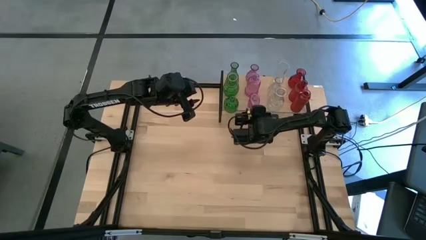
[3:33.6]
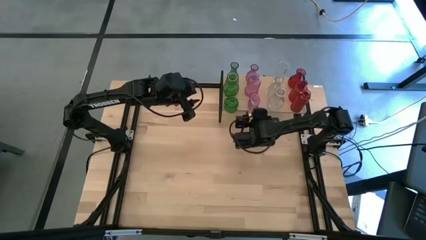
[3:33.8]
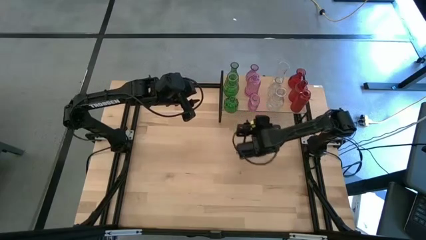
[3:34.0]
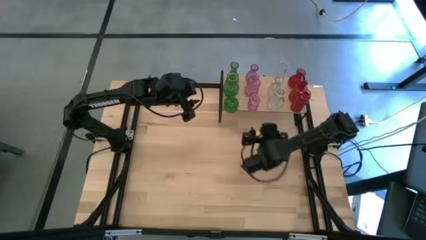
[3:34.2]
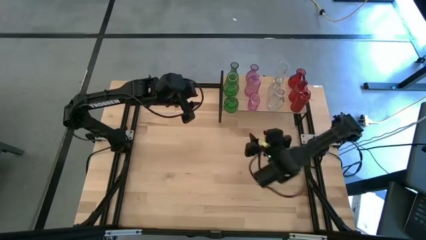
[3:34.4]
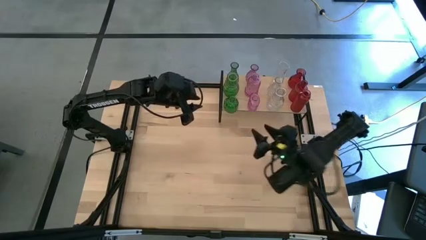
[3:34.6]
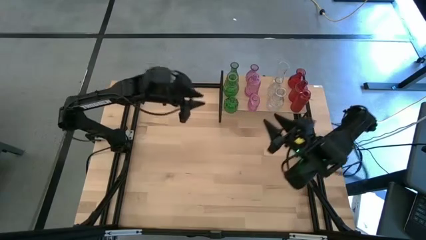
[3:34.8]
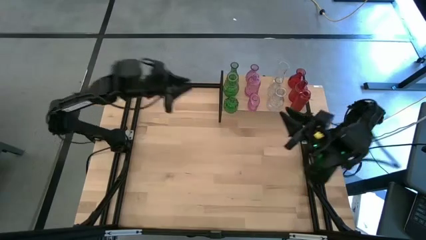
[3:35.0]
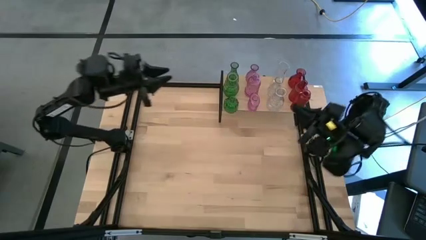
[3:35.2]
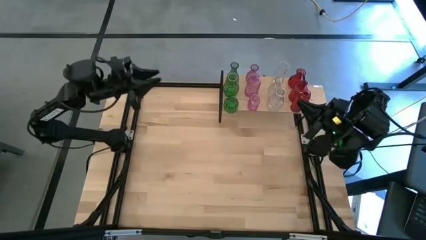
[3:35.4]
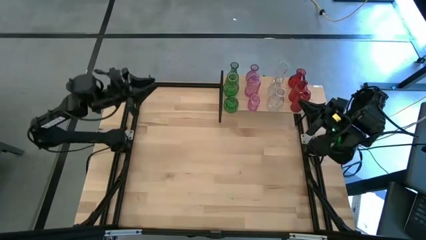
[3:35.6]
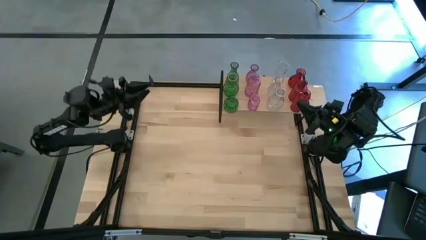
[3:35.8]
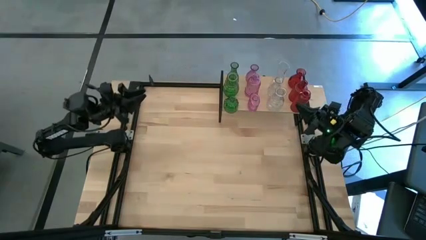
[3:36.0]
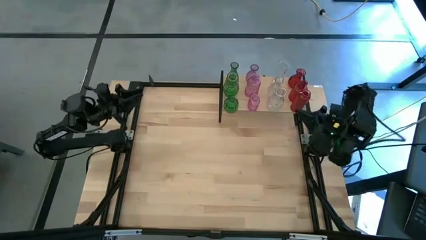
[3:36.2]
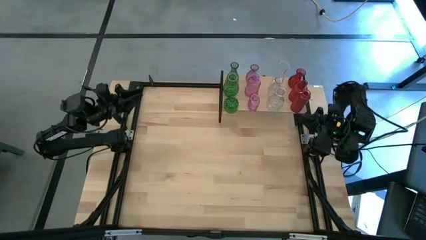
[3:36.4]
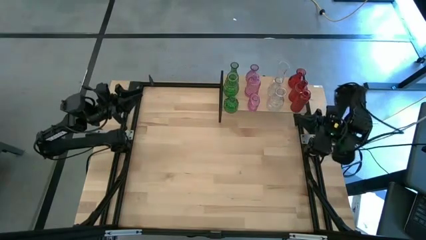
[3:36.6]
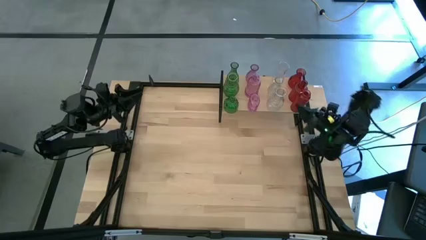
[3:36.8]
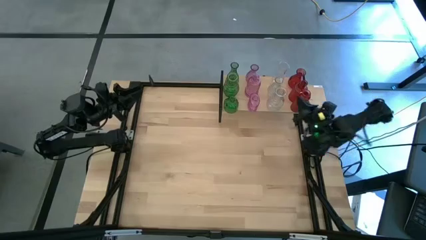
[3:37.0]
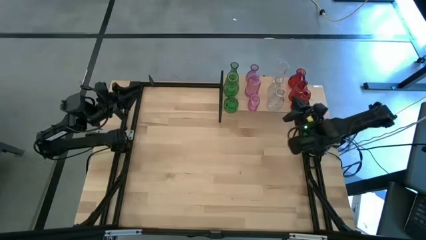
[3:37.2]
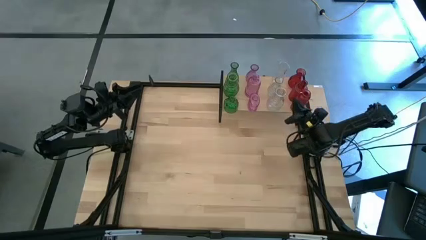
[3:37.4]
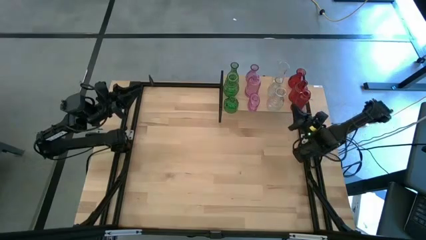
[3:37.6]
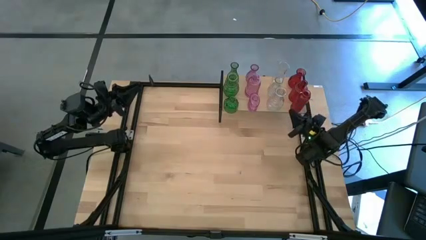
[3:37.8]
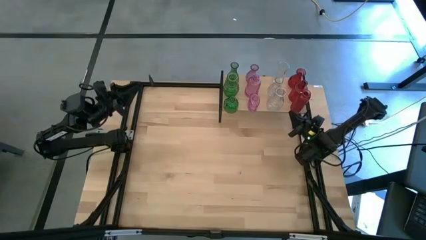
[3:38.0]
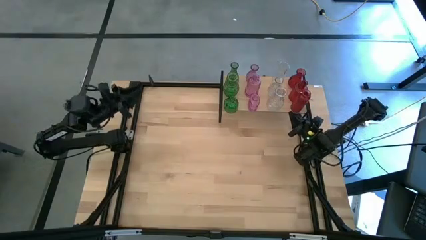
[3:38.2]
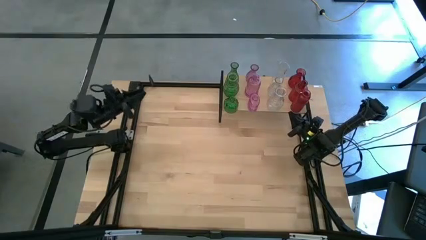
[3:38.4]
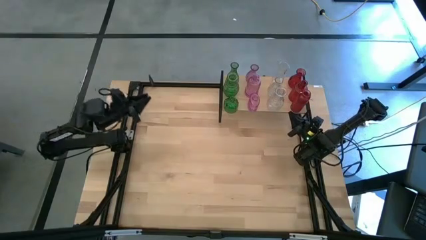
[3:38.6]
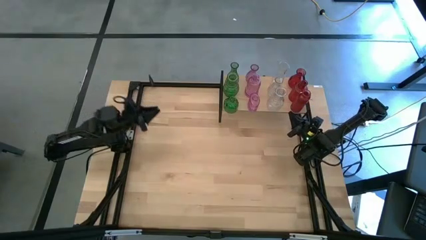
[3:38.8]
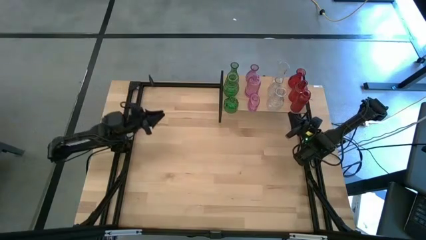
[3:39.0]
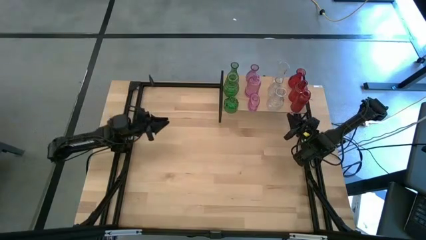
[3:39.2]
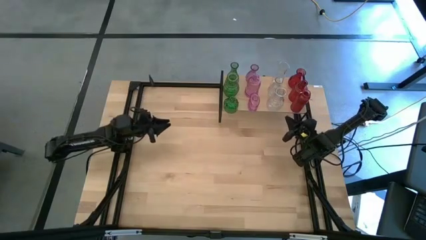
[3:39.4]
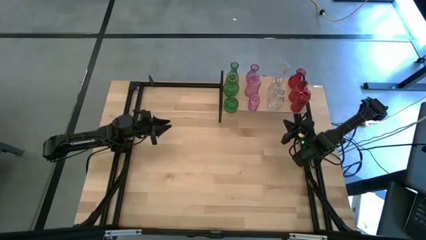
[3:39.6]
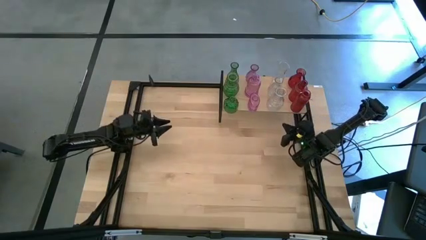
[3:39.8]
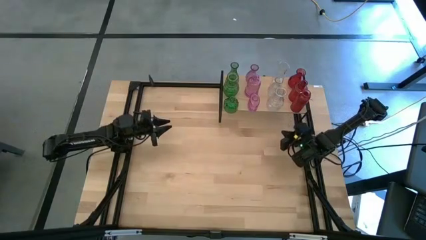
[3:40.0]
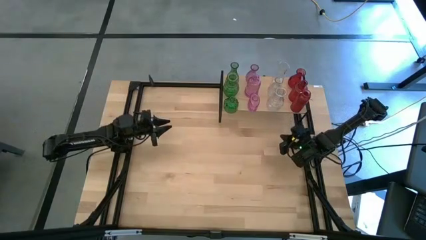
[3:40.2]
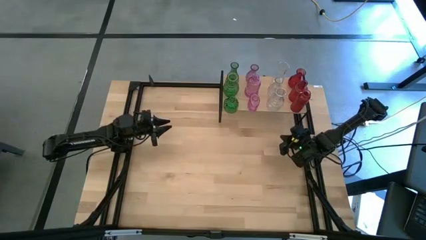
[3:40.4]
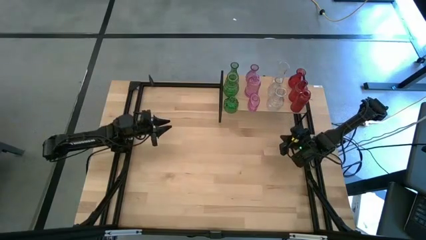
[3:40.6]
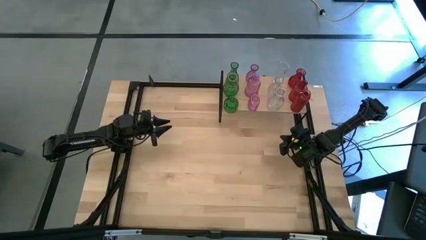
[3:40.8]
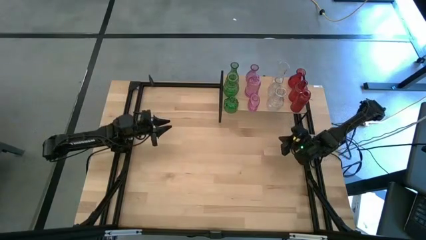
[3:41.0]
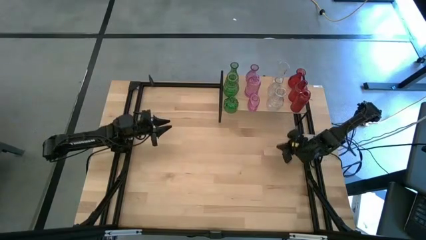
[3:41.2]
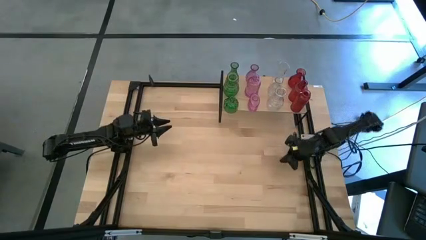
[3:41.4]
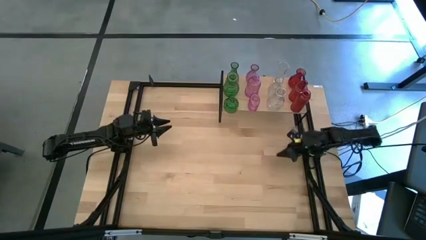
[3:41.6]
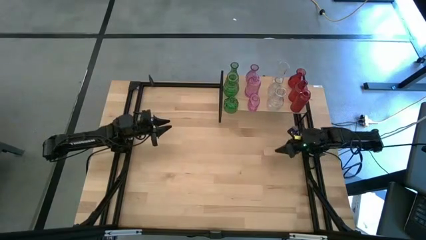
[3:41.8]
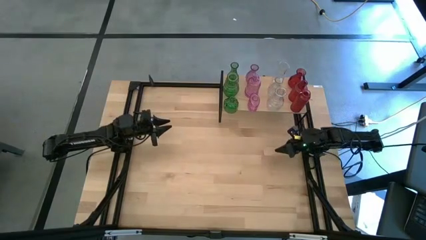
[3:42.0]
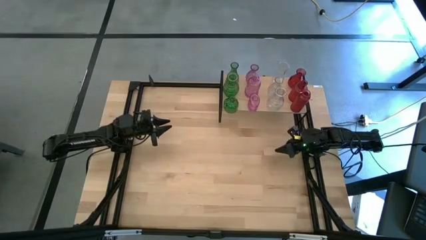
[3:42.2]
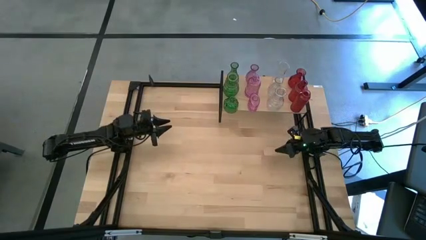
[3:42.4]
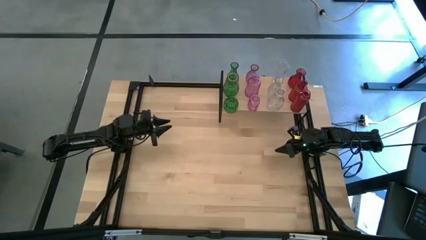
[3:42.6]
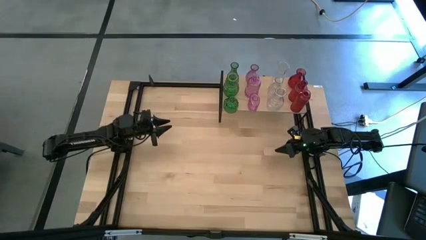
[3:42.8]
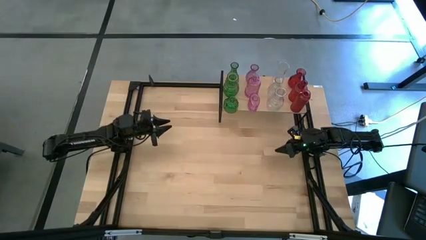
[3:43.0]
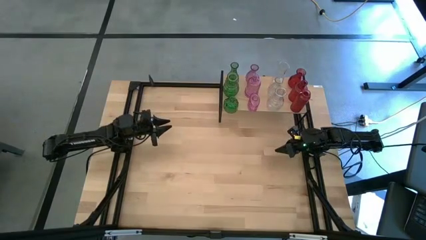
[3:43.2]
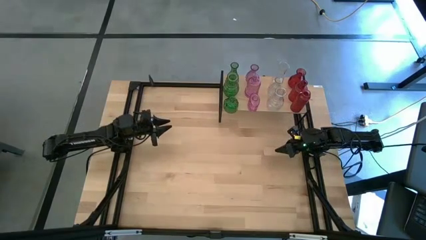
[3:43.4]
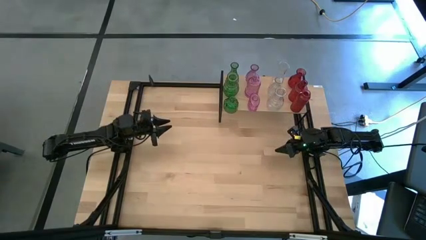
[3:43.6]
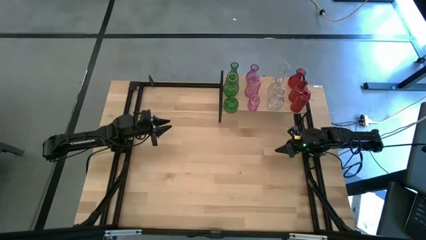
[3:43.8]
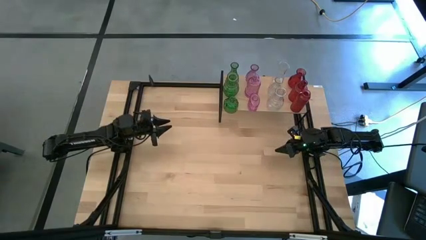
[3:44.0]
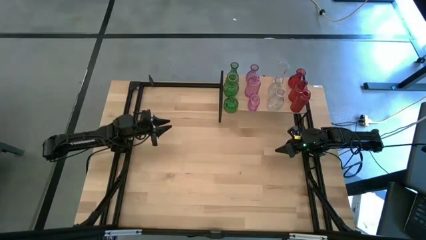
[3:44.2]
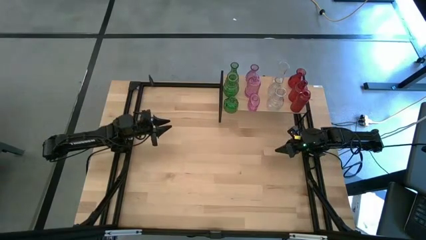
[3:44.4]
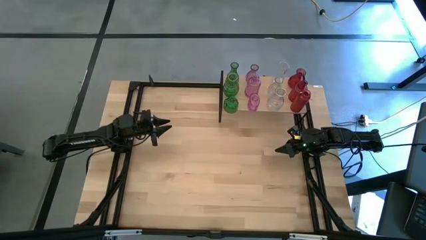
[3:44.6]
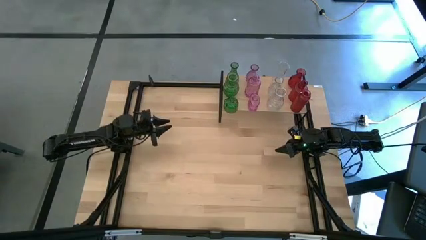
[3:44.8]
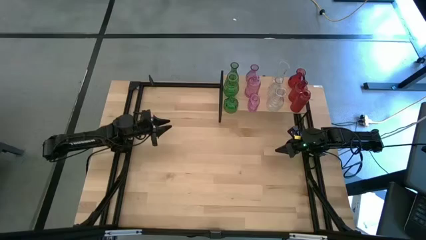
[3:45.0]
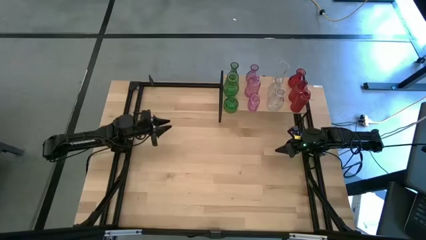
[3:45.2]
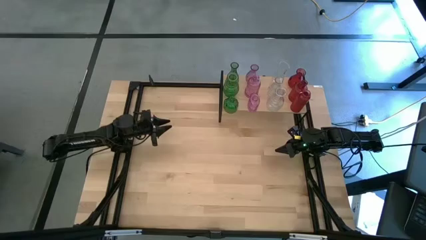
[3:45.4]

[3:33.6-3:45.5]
Task: sort vases onto shelf
Return to Home Position

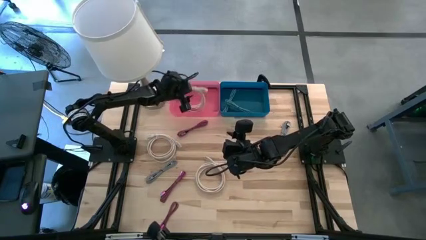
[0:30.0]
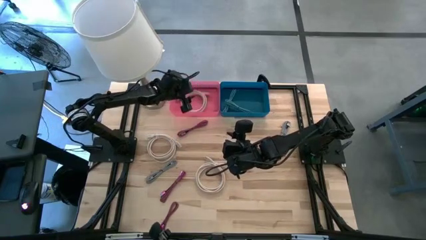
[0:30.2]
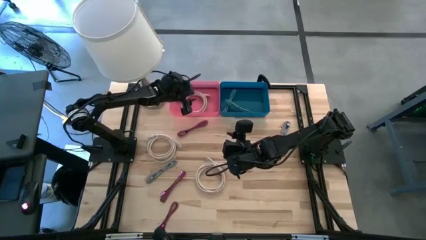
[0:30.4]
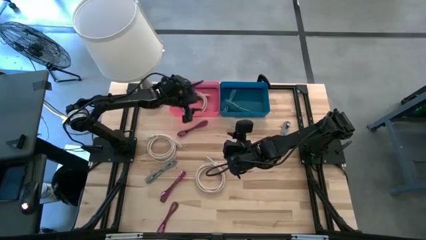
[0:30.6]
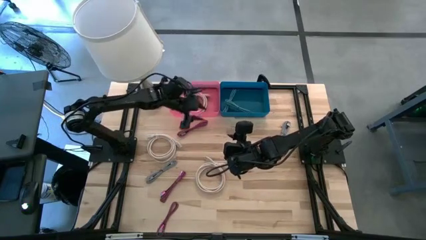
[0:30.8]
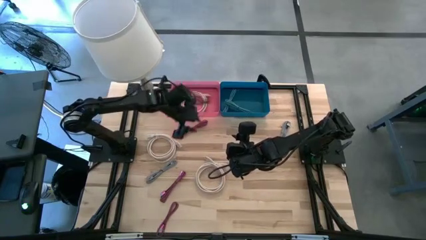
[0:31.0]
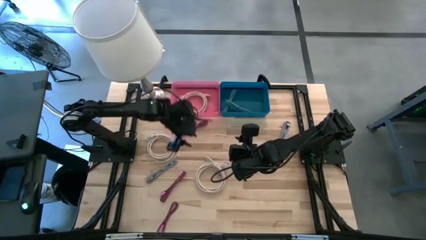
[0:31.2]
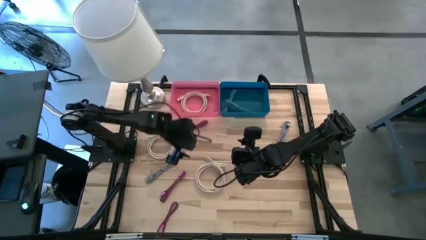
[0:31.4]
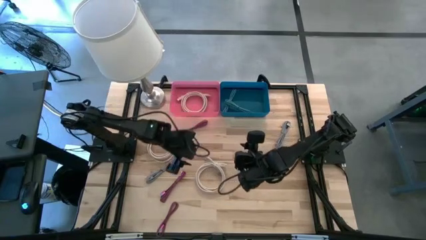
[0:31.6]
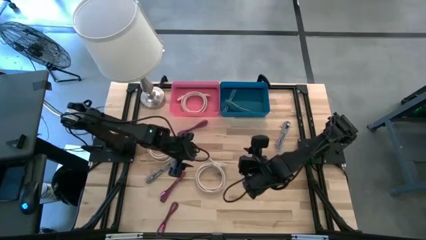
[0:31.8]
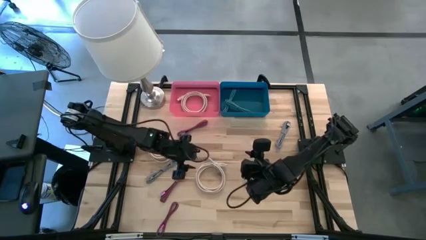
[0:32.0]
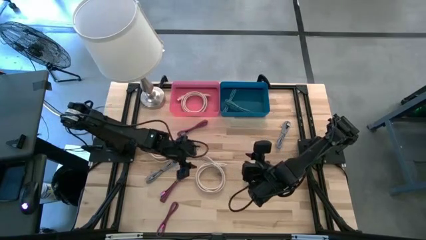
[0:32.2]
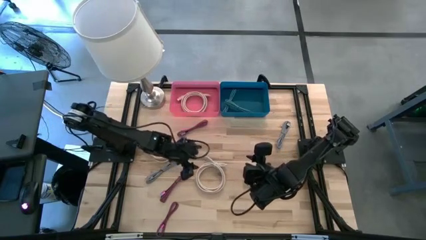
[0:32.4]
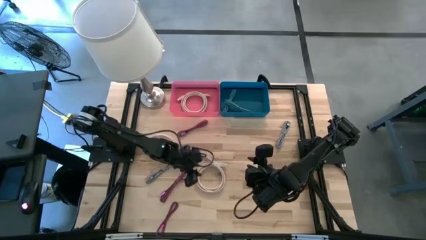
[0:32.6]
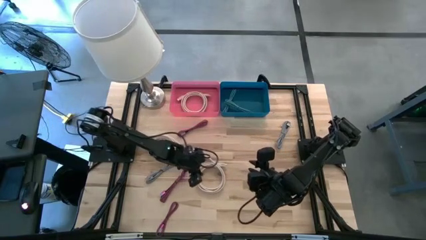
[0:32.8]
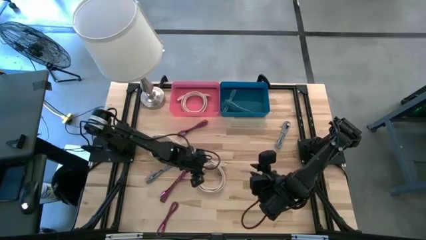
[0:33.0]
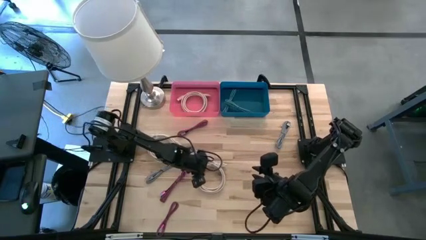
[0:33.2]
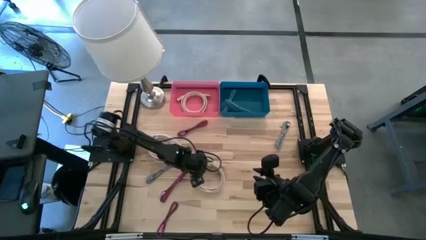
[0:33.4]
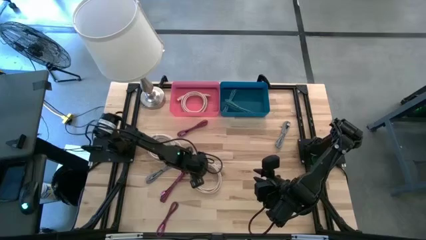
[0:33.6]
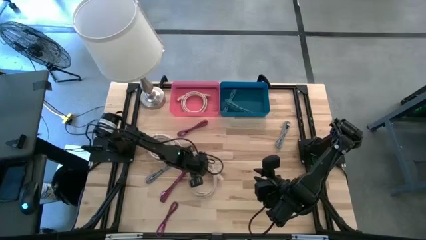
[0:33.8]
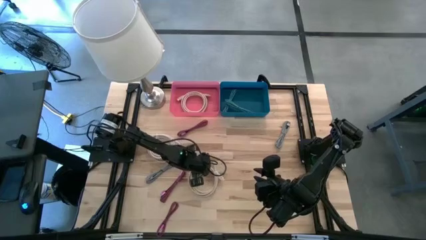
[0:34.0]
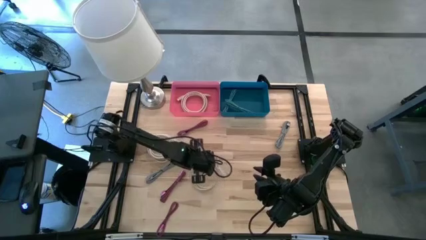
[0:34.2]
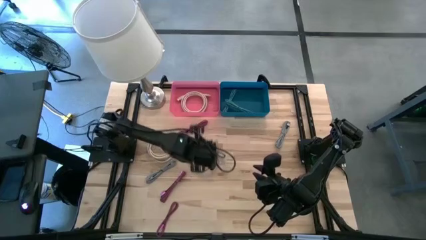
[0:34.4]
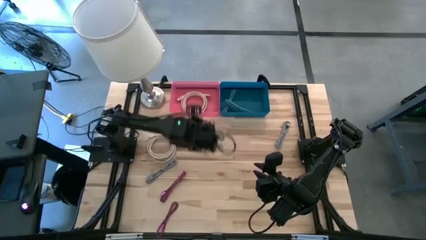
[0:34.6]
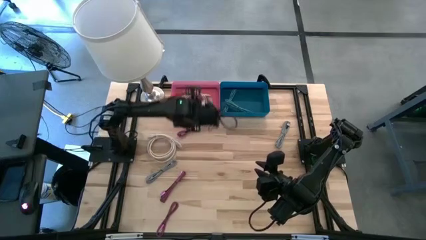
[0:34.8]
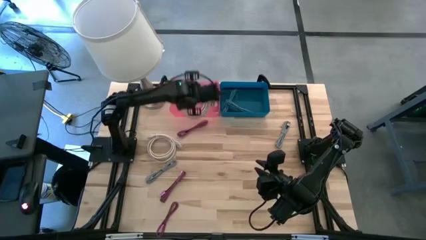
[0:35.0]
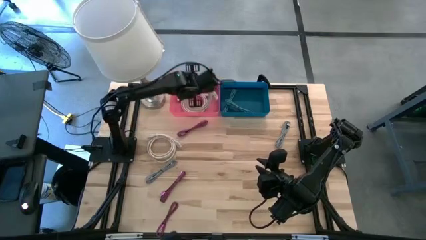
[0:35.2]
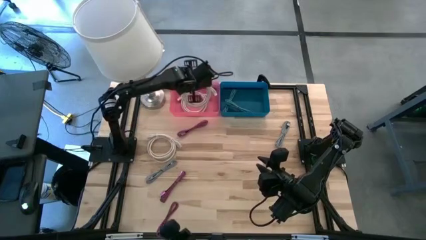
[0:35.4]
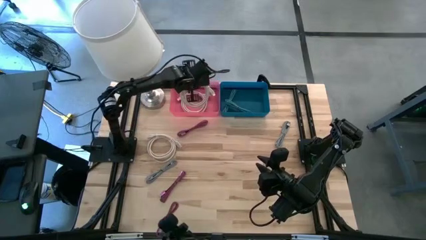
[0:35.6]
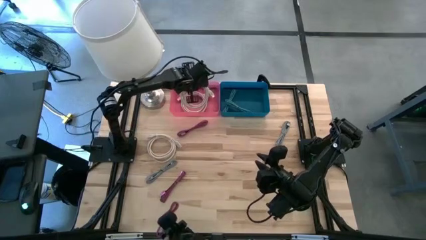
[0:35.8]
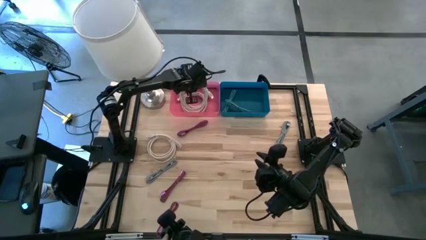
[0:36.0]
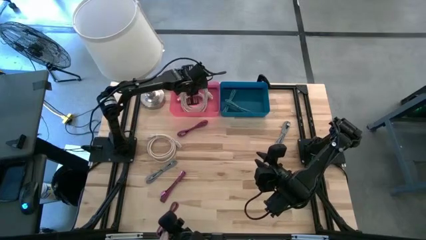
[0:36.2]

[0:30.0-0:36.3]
Task: Pick & Place USB Port
Put the bottom large white charger cable into the red bin
